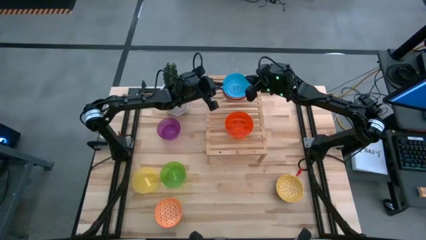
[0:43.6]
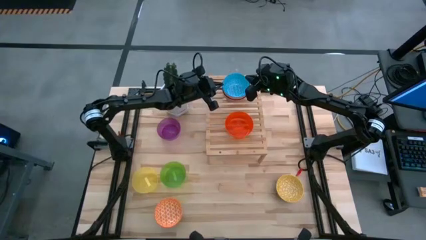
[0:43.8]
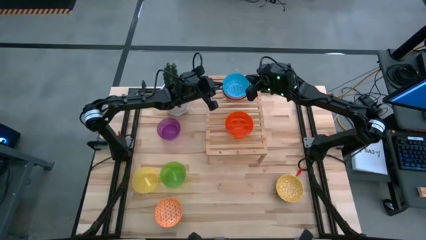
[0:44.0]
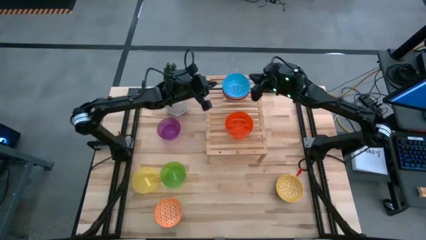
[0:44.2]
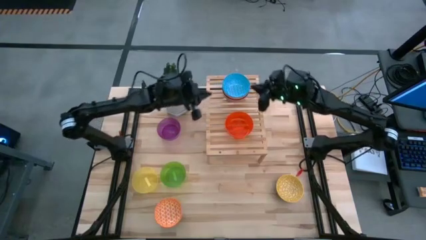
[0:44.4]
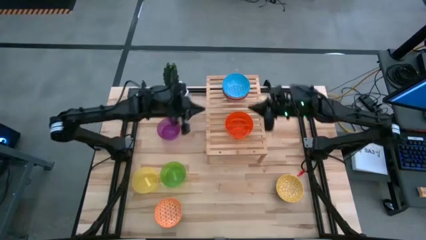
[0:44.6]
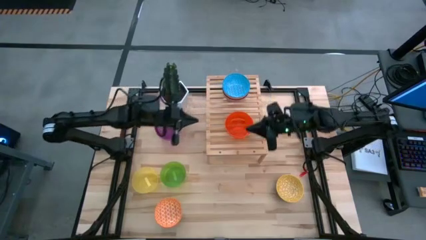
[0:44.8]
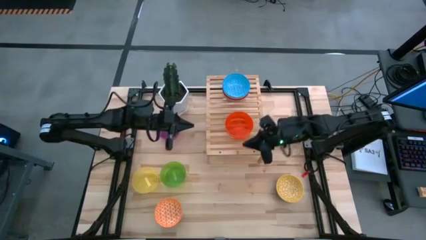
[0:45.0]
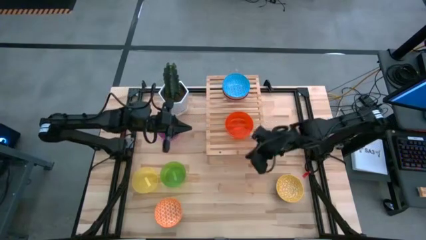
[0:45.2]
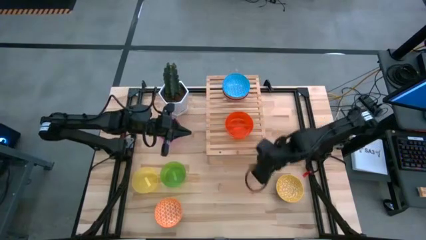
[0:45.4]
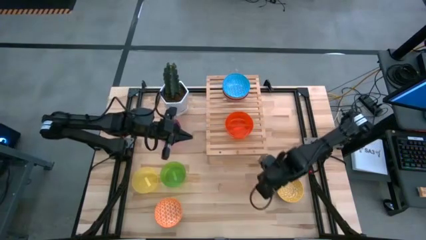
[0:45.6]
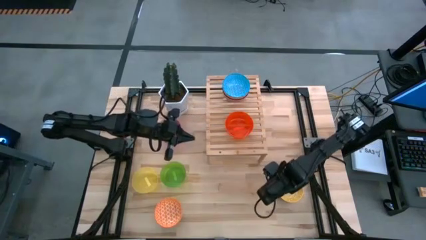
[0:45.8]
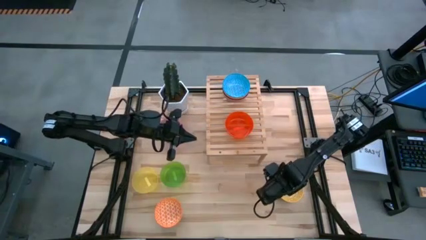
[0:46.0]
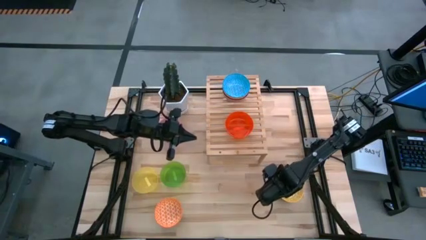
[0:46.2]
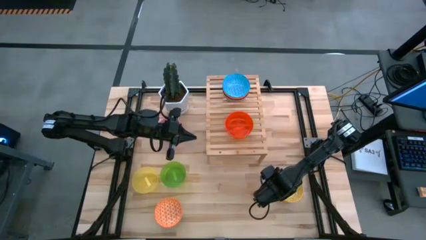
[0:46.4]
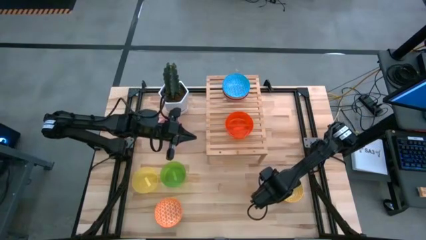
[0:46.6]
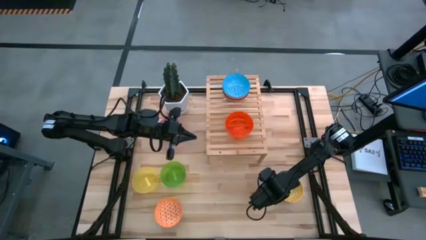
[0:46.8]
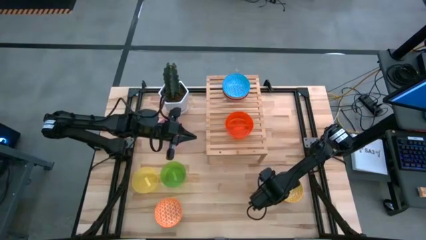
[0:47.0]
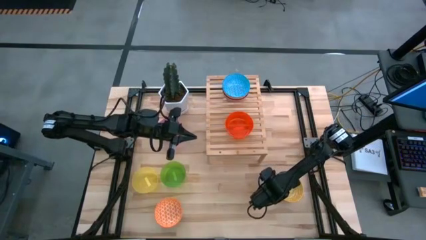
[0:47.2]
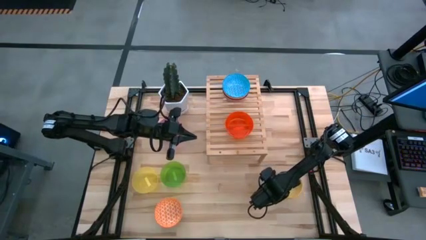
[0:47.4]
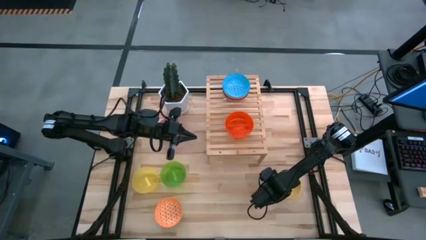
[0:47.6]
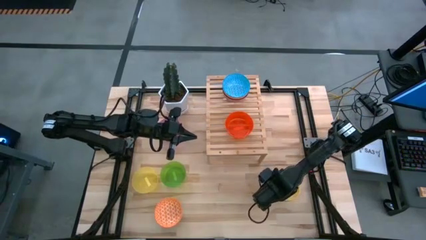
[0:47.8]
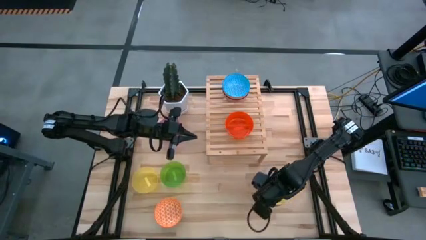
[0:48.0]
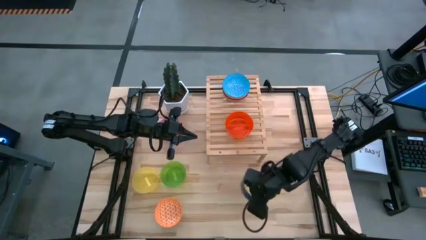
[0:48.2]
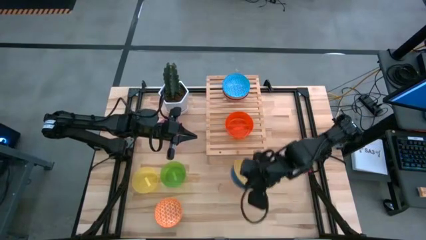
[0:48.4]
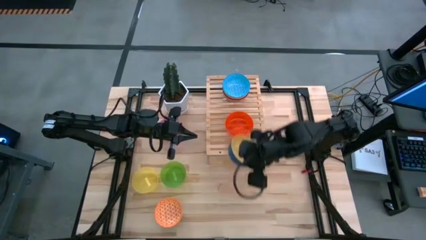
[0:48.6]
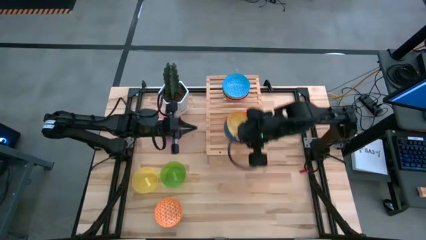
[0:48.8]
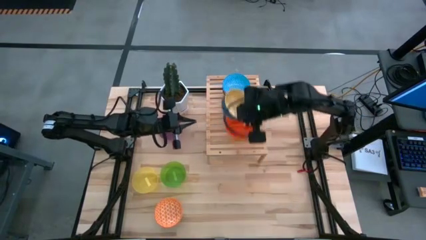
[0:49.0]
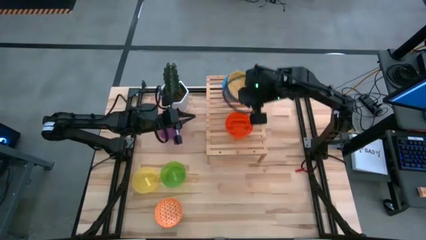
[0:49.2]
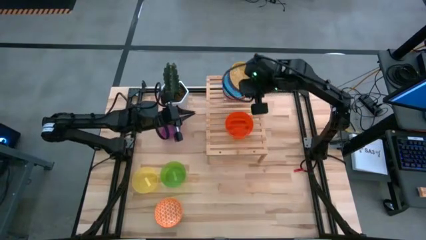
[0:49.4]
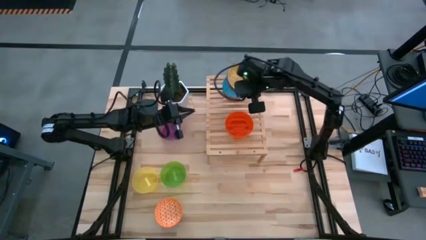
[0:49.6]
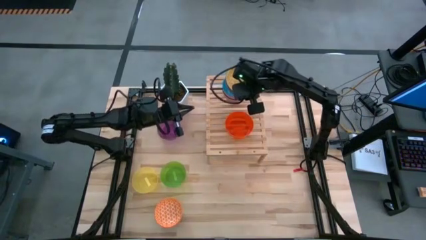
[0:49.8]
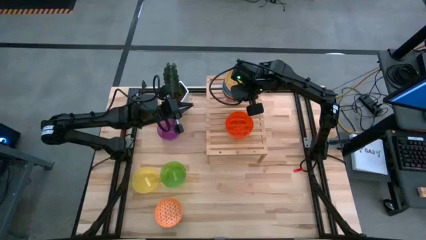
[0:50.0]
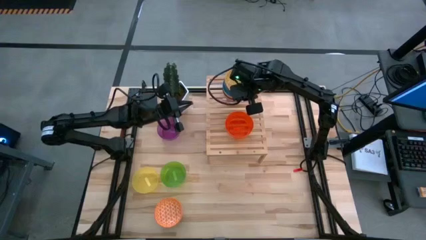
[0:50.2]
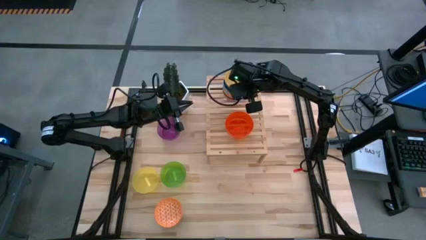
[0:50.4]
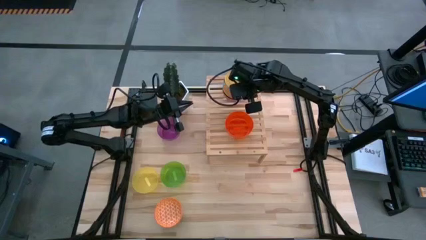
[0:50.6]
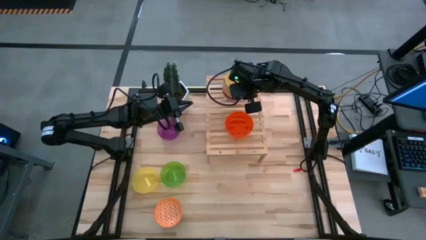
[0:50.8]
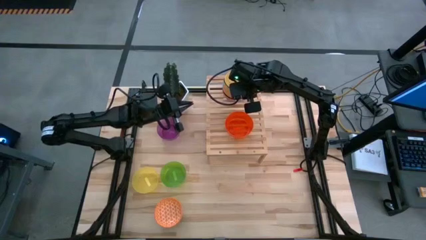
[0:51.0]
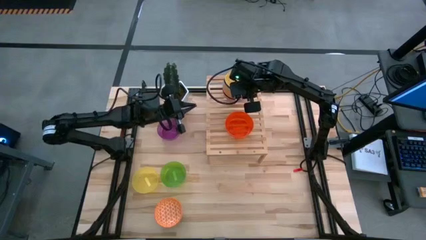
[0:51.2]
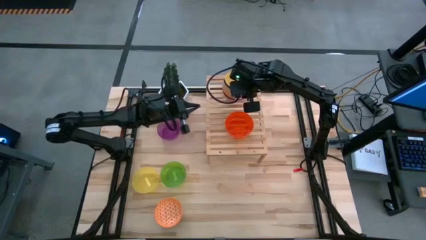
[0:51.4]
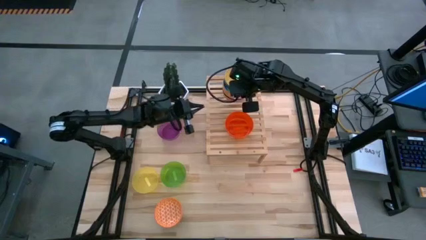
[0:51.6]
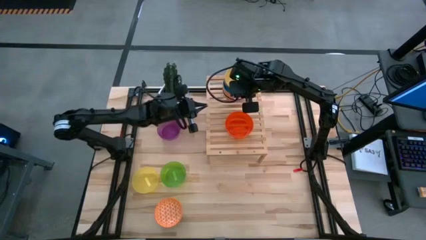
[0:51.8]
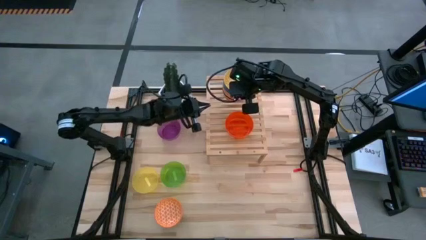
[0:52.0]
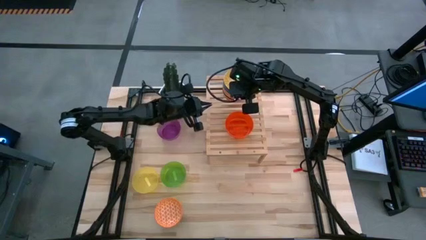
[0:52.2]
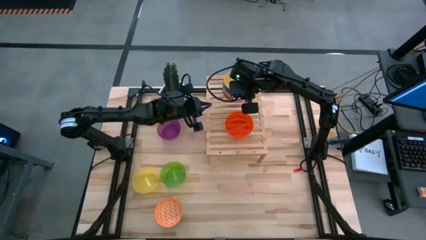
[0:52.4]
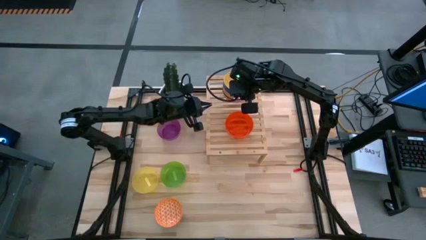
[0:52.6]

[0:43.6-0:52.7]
Task: Place and stack bowls onto a shelf
Stack the yellow patterned bowl on top of the blue bowl on the shelf

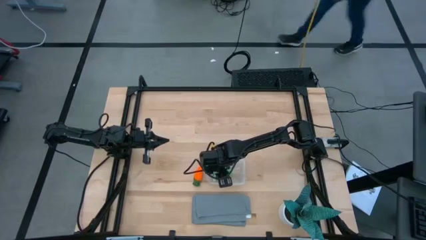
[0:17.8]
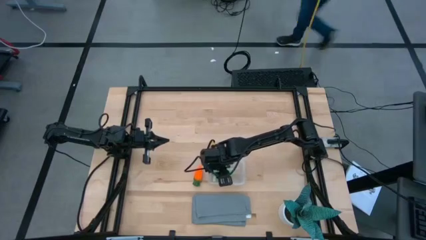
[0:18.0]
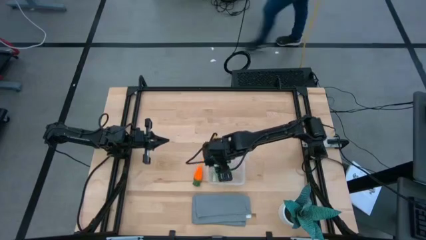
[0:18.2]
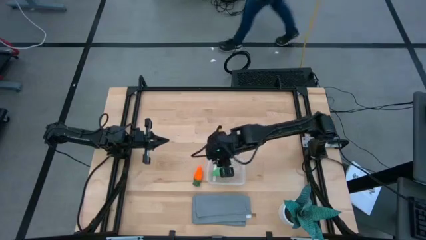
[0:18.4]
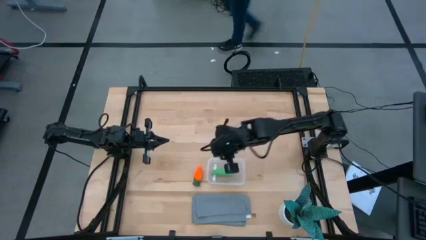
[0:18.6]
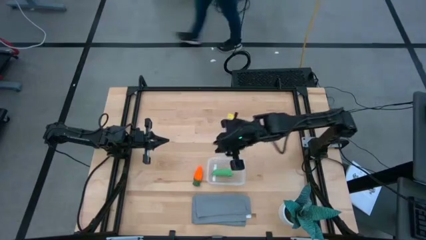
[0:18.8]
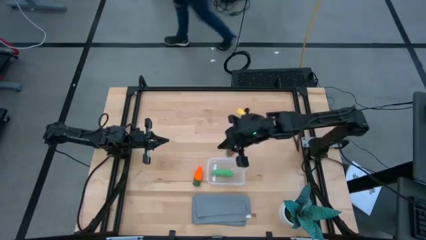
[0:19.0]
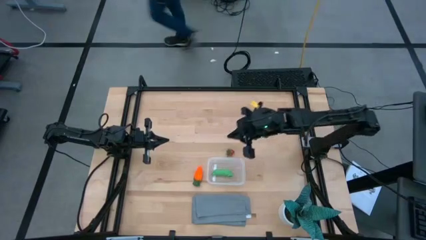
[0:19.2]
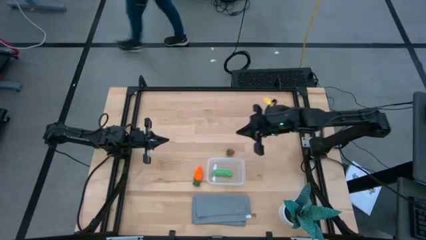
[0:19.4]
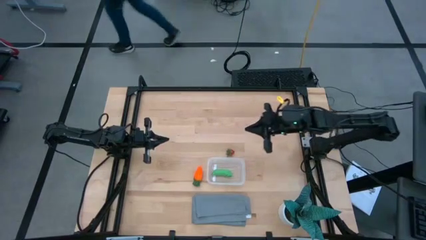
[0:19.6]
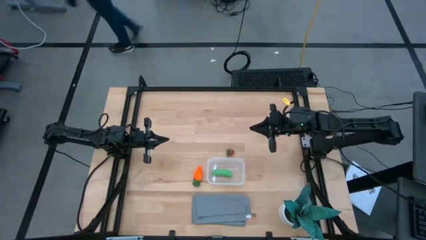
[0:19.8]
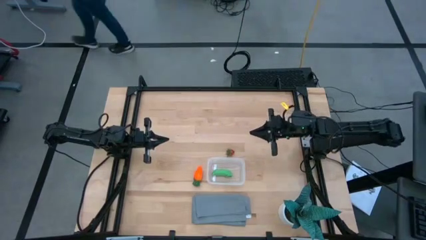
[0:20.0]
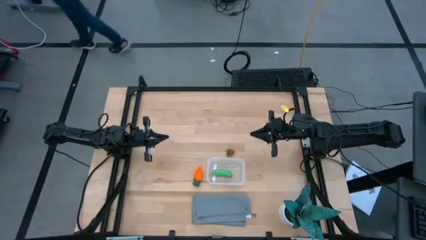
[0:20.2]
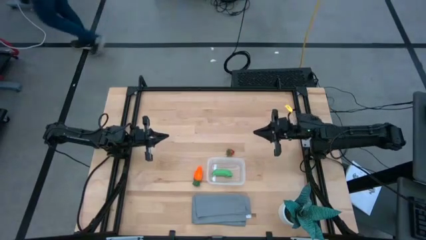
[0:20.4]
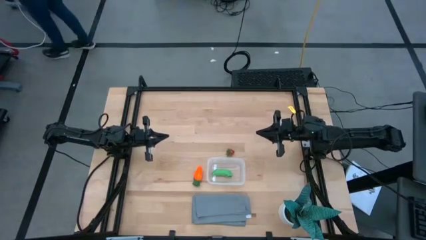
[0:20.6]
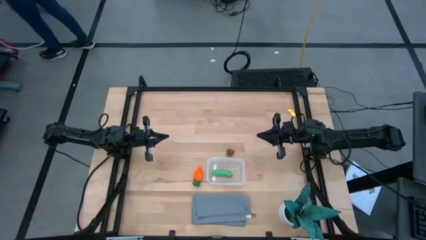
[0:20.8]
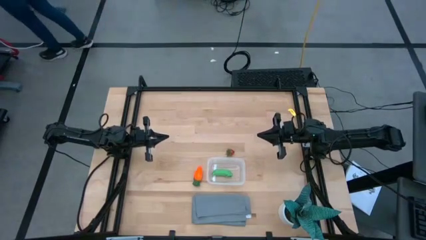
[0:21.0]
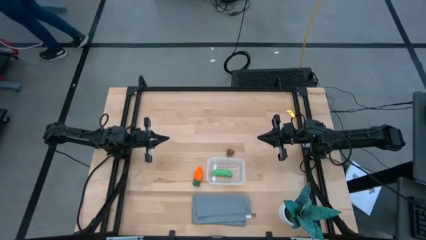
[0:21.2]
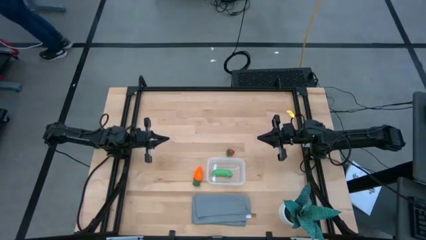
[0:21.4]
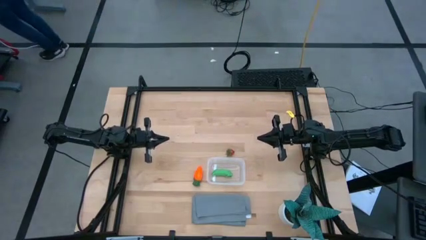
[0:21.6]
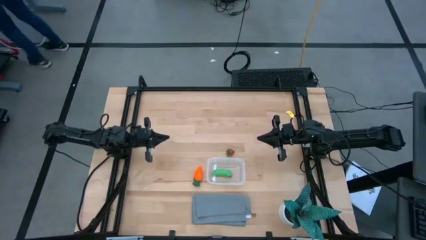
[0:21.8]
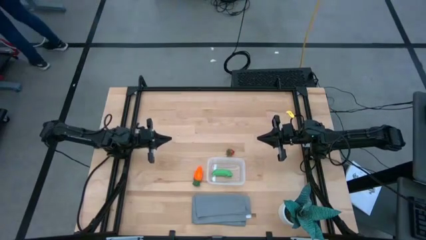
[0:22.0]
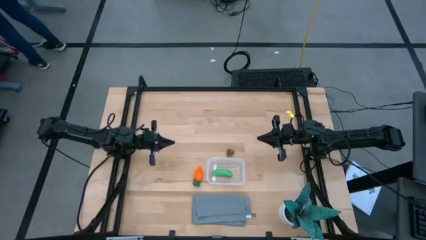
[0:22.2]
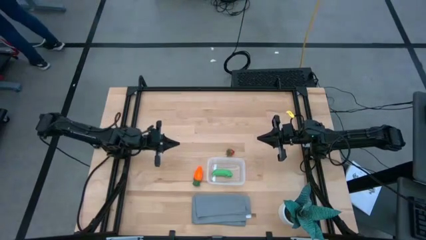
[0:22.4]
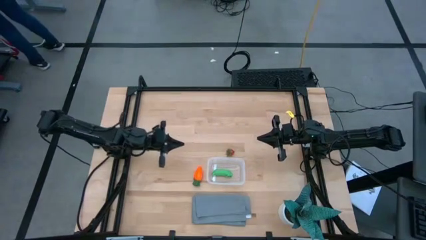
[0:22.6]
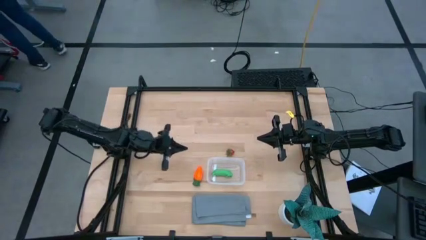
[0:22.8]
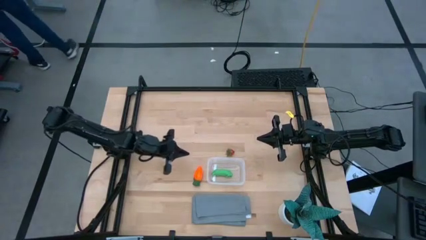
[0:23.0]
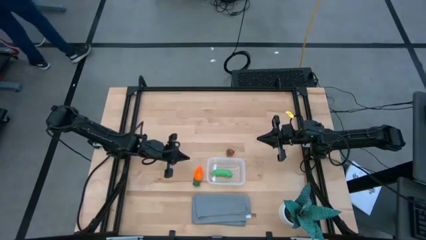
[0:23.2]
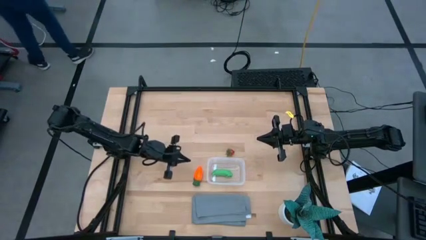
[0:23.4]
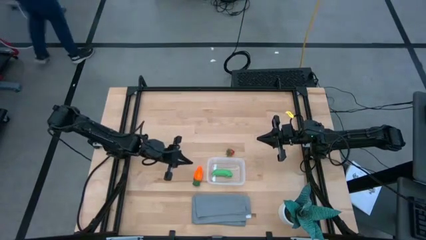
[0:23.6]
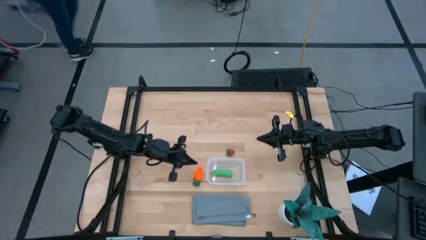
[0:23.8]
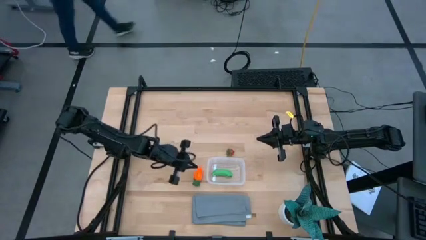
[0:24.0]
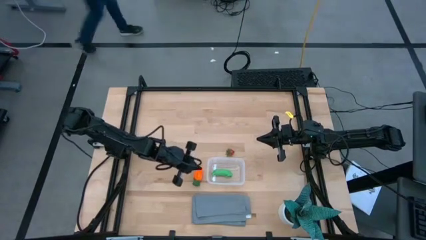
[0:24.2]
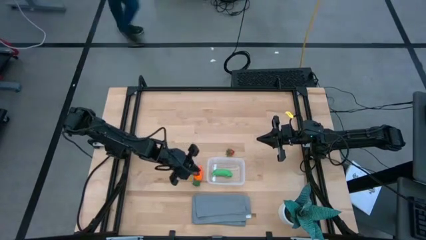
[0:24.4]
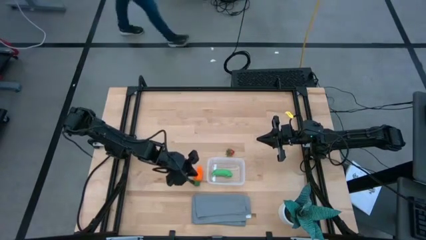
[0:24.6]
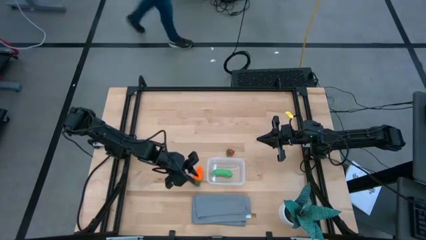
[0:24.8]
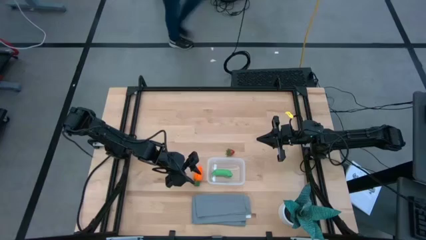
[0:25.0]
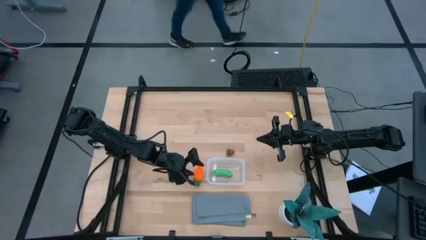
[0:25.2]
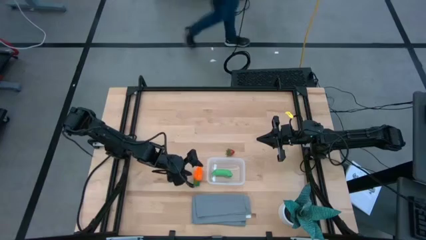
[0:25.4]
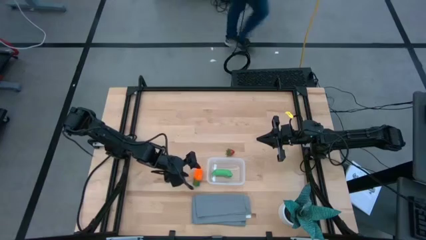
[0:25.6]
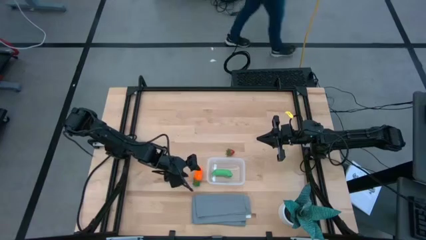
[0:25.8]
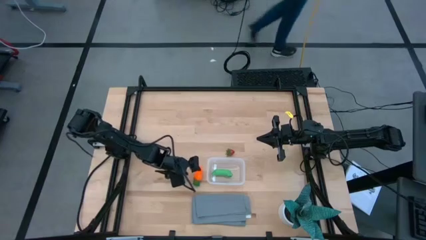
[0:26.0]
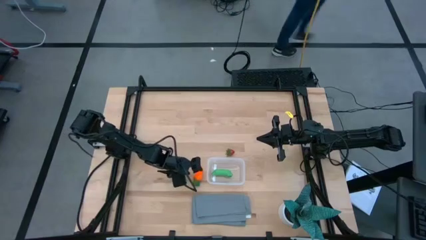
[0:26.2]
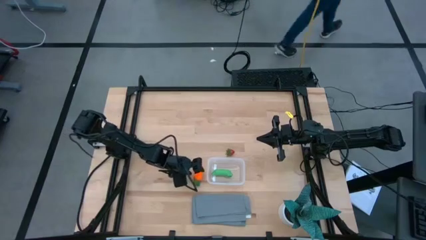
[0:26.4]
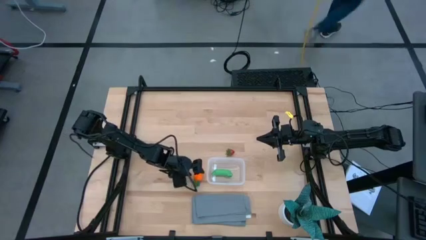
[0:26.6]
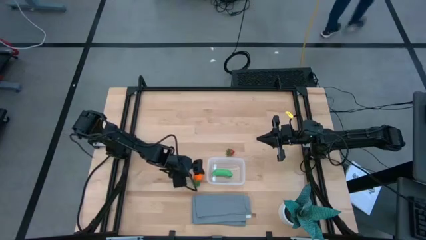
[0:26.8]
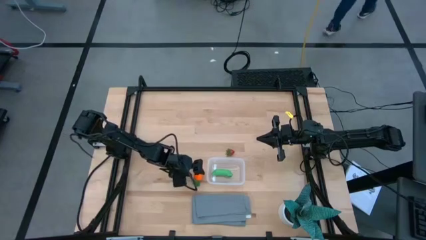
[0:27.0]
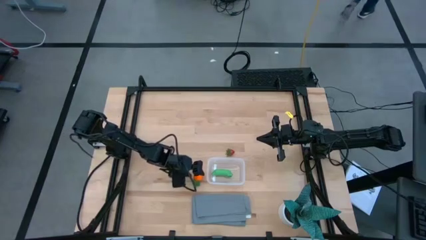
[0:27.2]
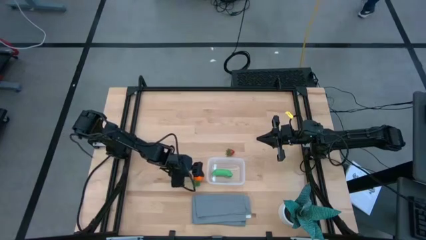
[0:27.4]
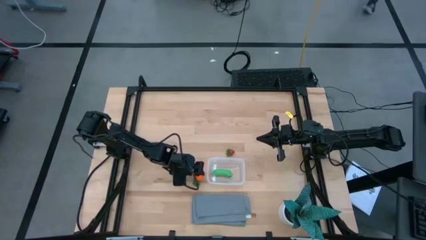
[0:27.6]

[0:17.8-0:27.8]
Task: Pick and placing Produce into tupperware
Put the carrot into the transparent bin
